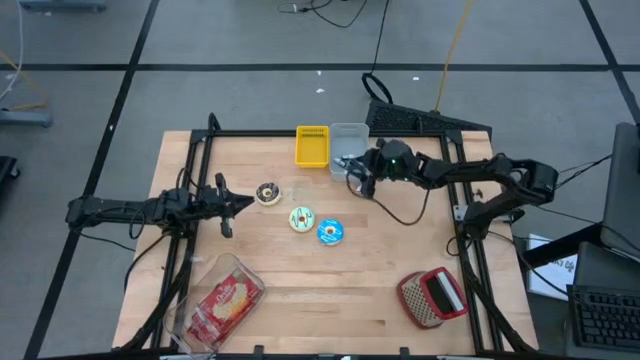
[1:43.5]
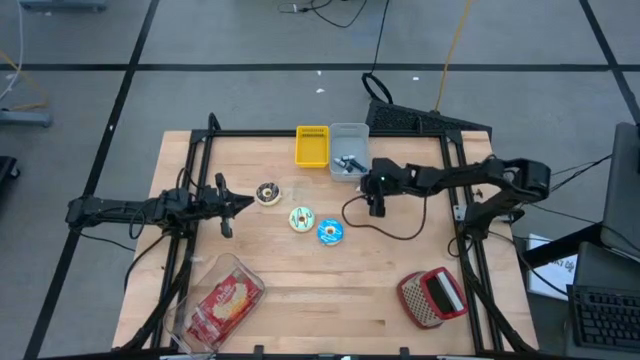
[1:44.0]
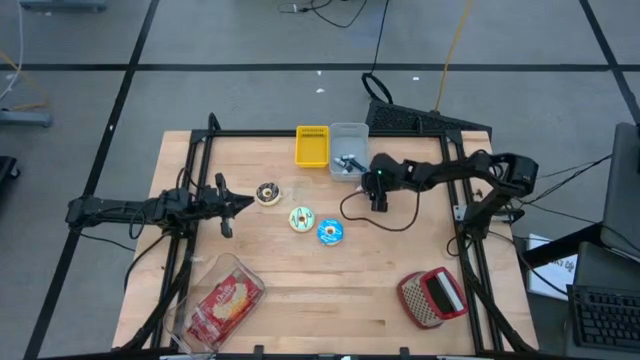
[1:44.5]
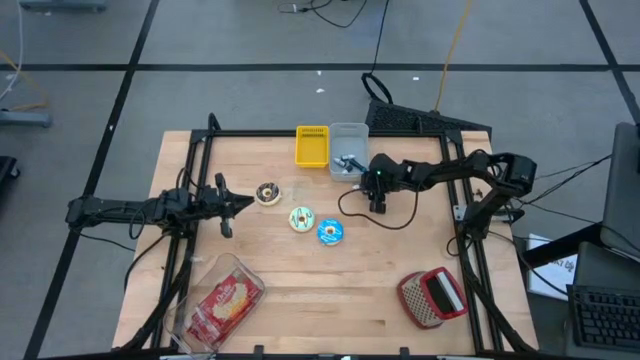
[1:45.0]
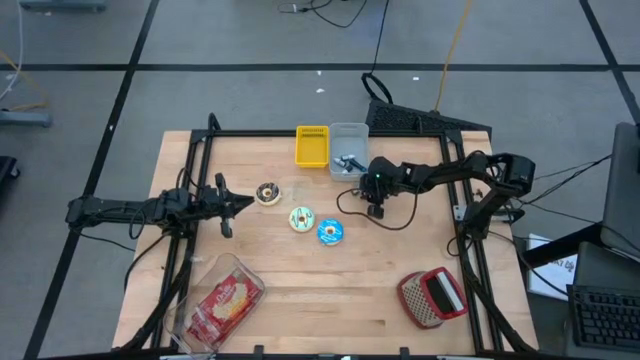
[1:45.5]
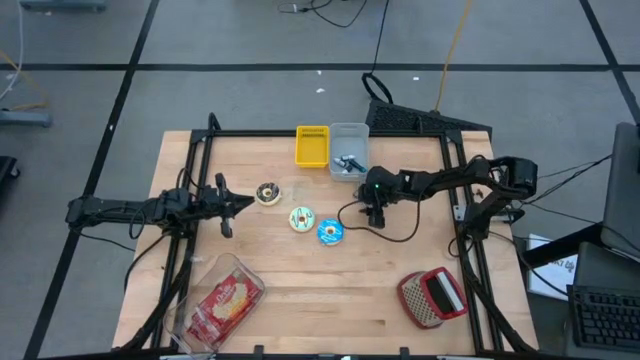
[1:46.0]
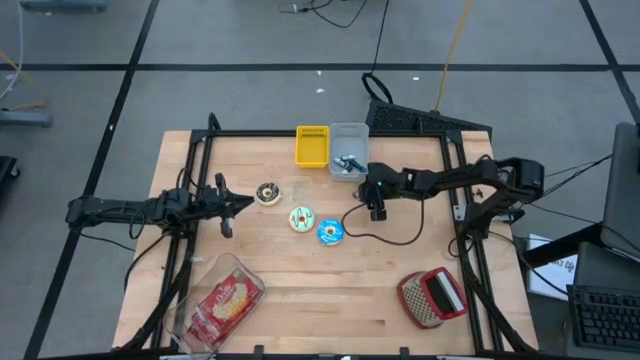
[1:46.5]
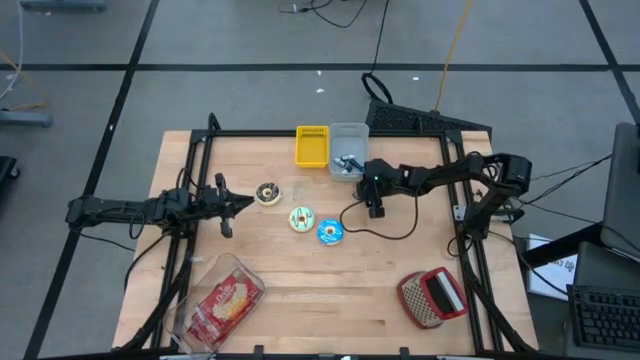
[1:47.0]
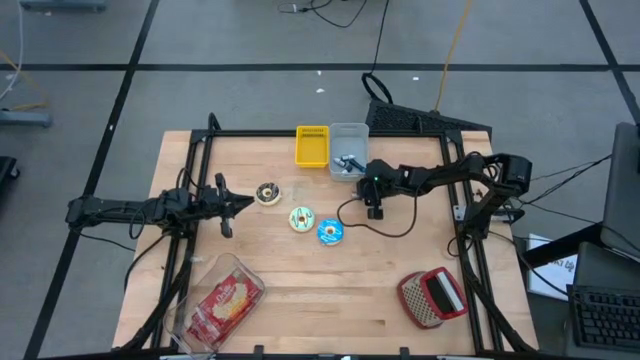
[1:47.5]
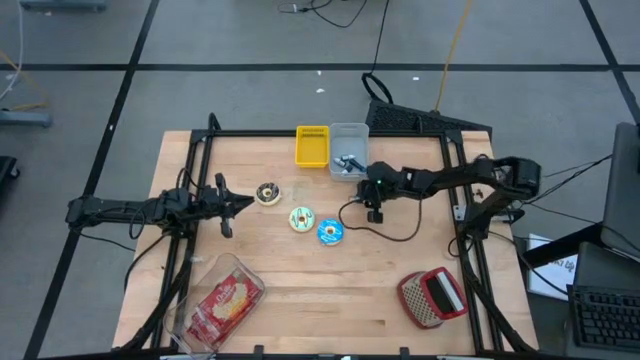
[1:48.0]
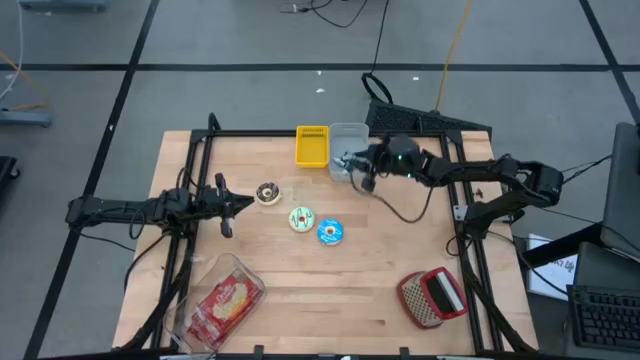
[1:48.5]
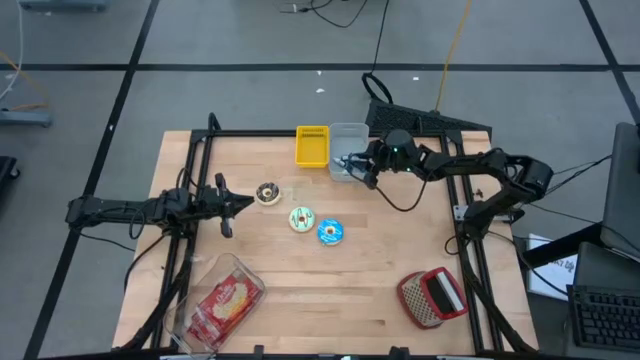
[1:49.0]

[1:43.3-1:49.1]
Put the green food coloring bottle into the white basket

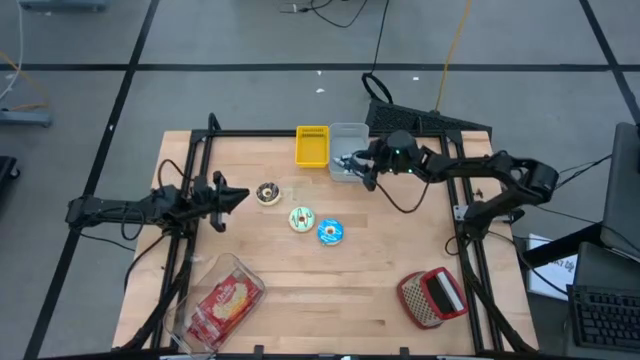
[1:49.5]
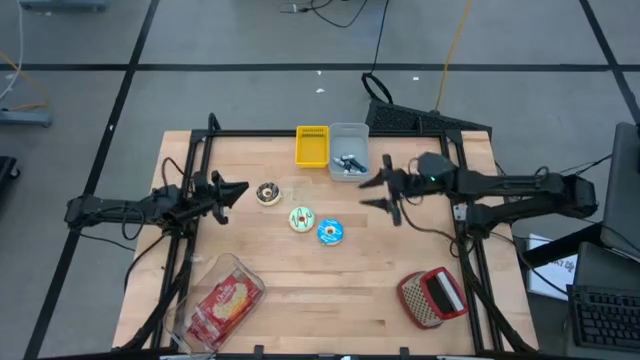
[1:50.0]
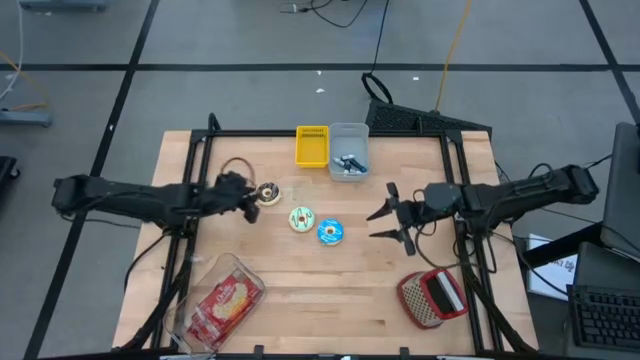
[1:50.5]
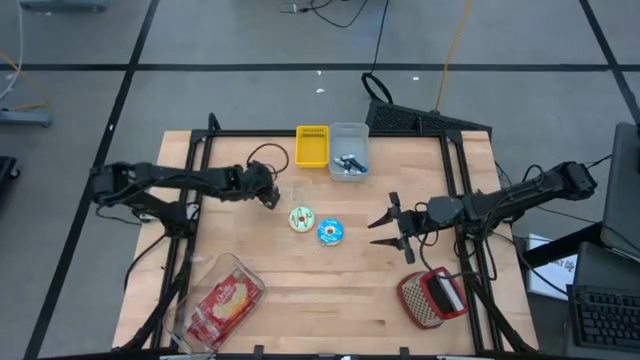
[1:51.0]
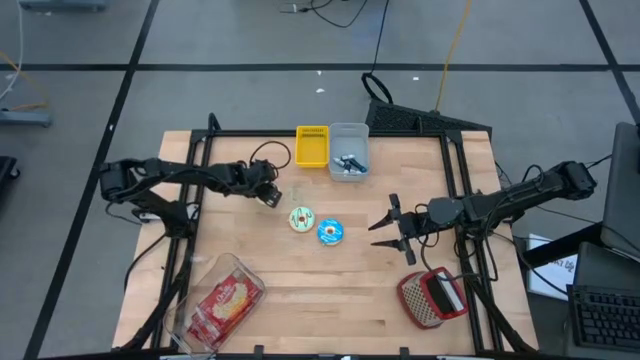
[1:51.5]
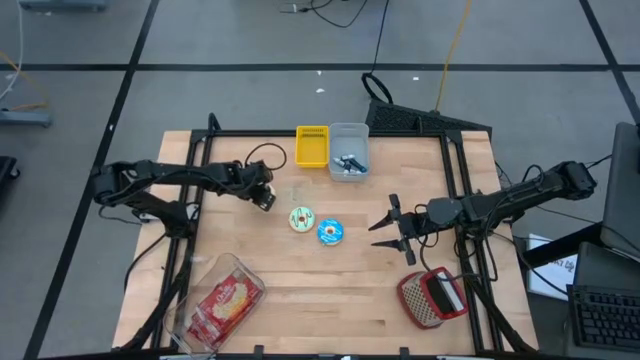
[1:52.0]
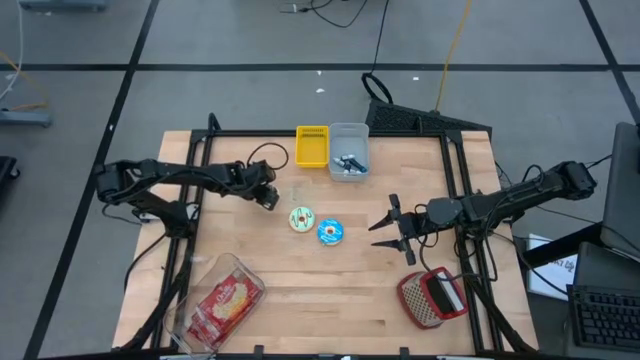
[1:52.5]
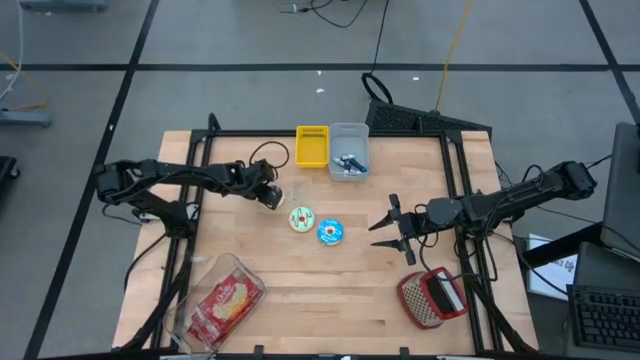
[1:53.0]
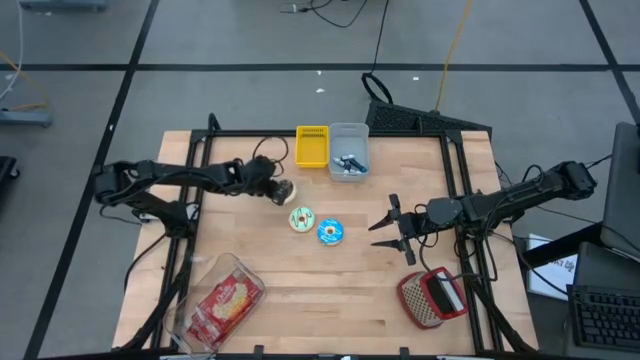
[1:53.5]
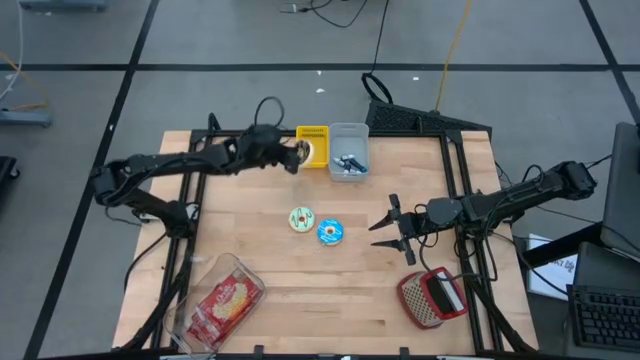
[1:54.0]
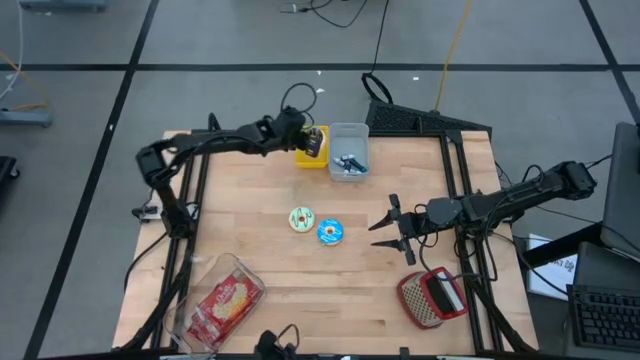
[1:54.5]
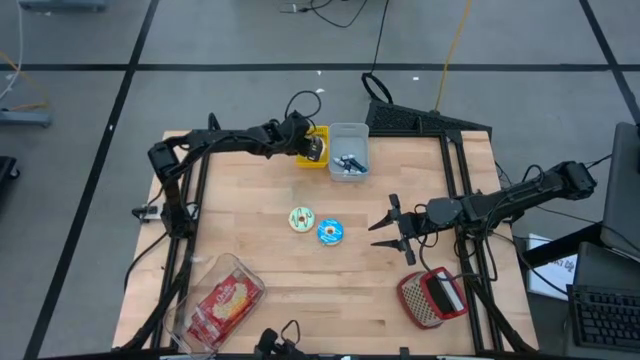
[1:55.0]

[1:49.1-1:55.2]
Put the black donut into the yellow basket

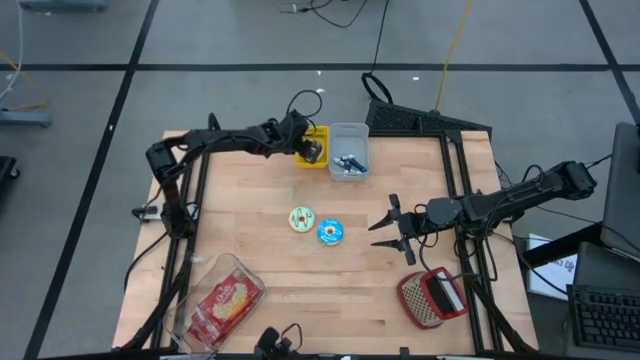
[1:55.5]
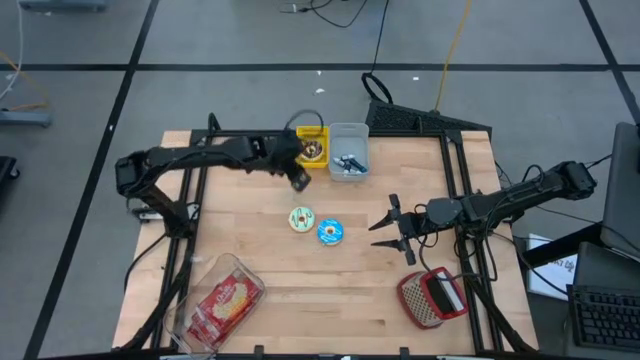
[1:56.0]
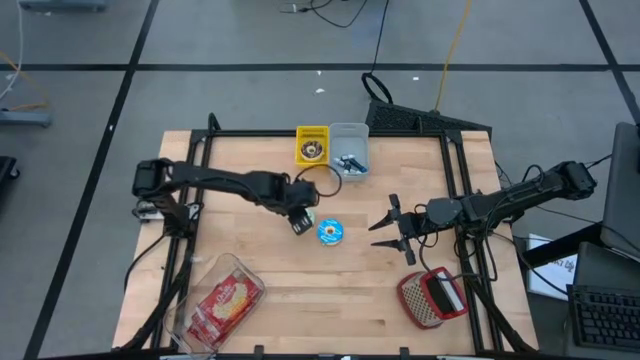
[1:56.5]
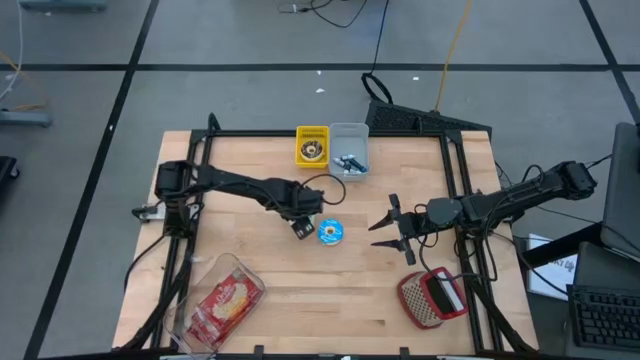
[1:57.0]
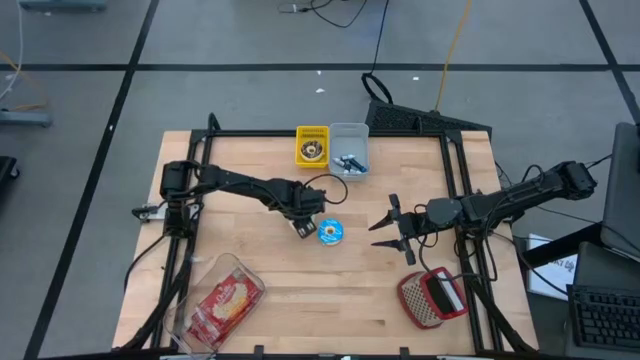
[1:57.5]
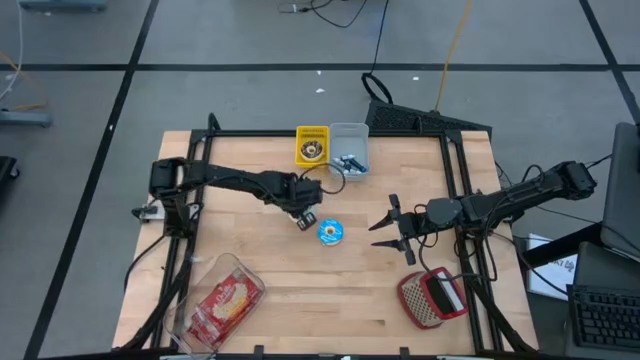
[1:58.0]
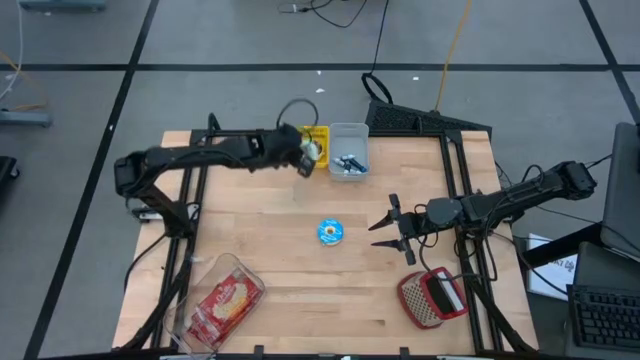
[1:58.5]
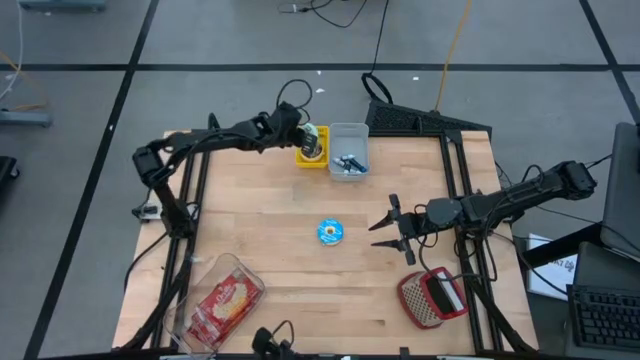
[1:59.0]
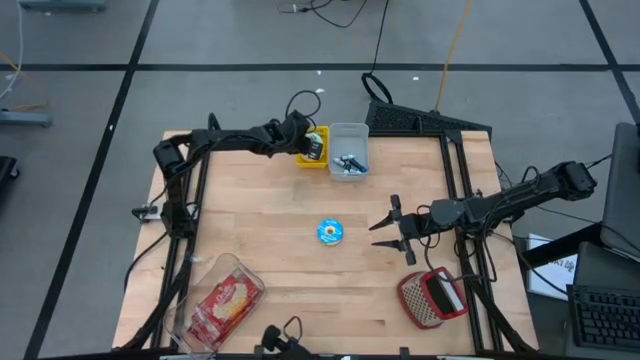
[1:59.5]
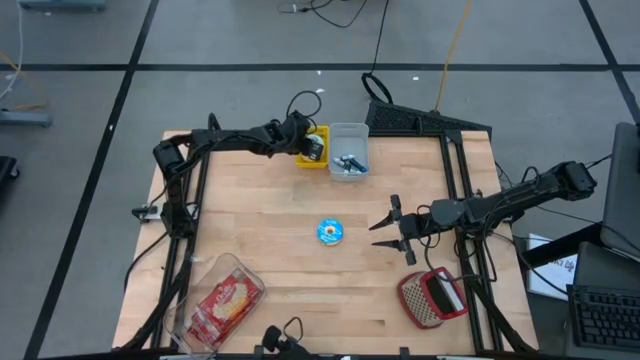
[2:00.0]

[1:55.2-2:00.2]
Put the light blue donut into the yellow basket

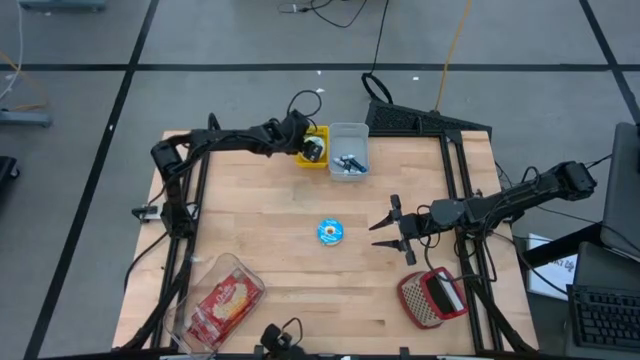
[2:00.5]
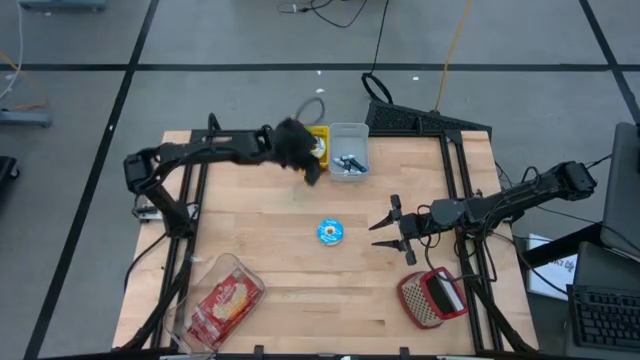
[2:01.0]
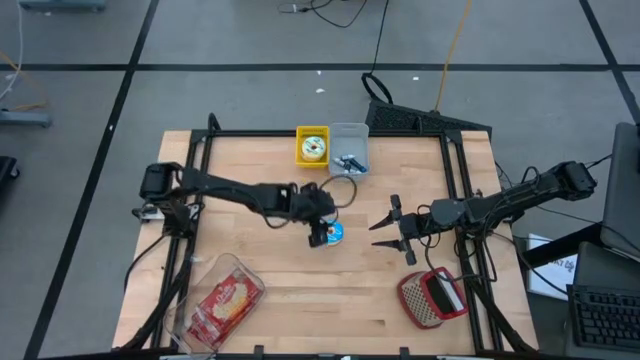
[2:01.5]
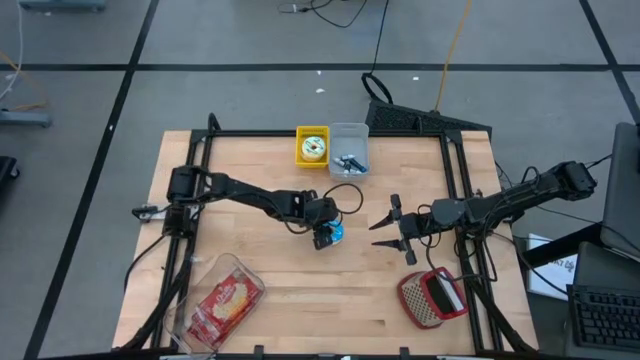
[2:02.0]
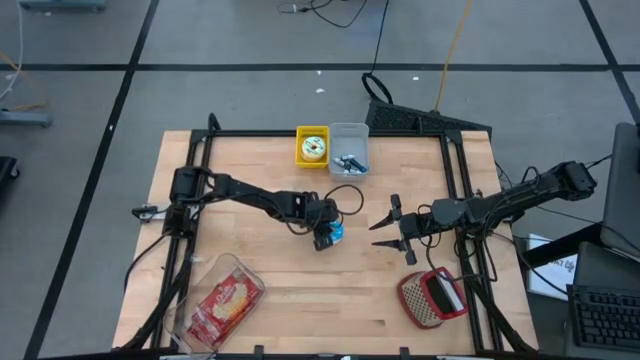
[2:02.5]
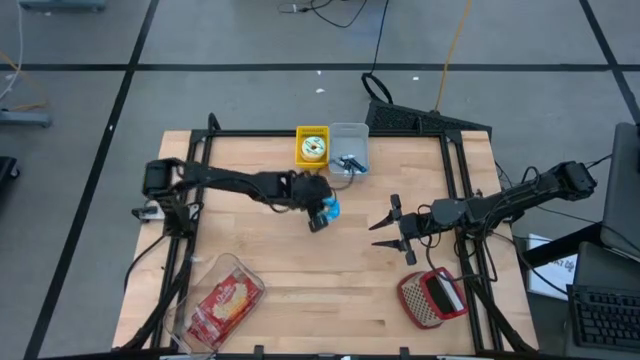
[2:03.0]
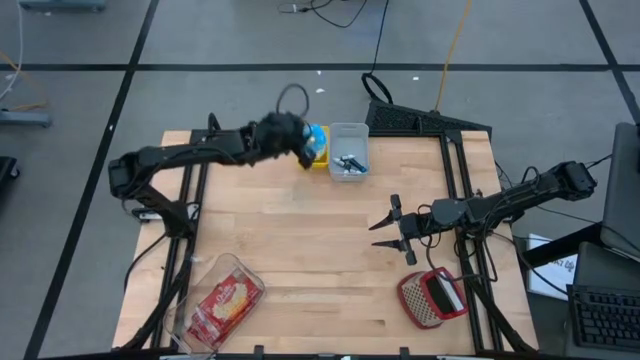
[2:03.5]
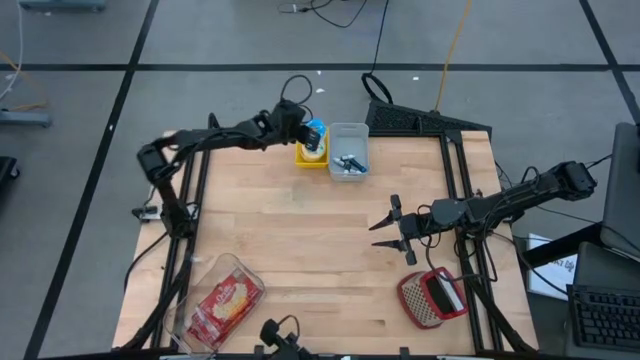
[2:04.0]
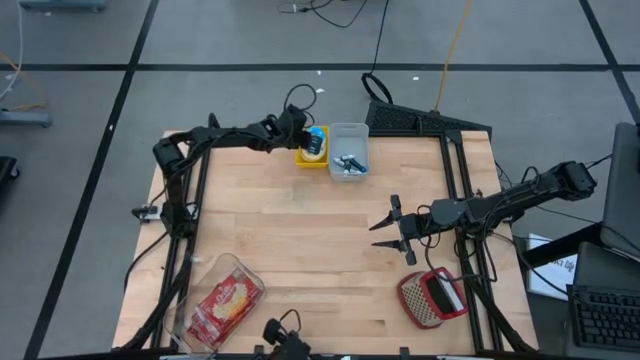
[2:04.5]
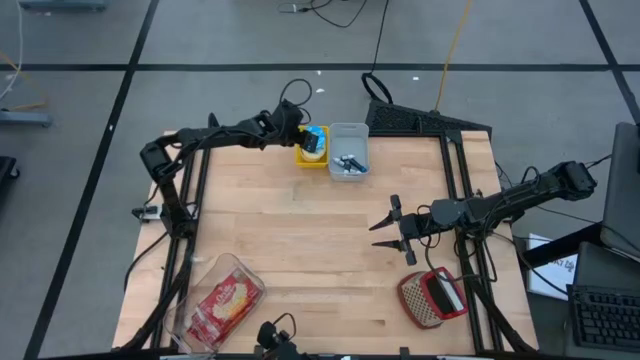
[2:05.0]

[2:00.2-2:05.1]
Put the blue donut into the yellow basket
